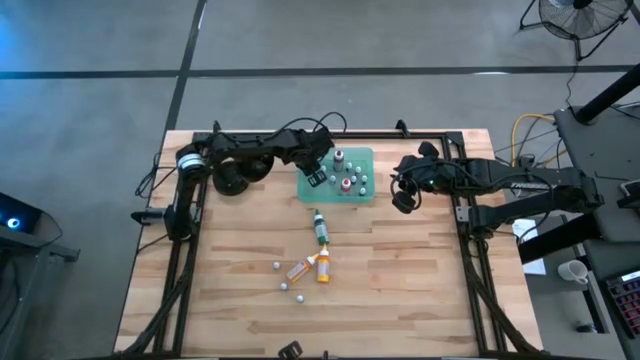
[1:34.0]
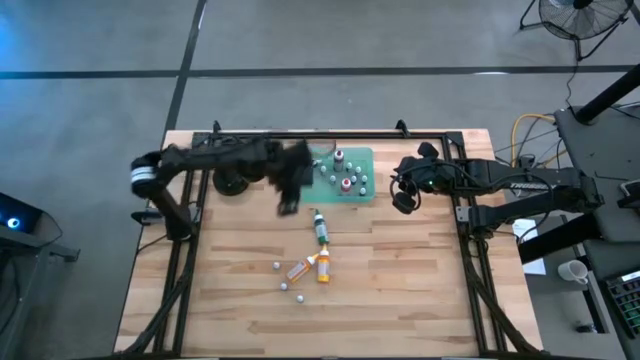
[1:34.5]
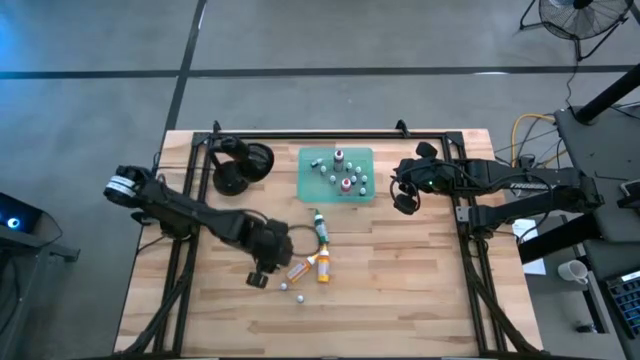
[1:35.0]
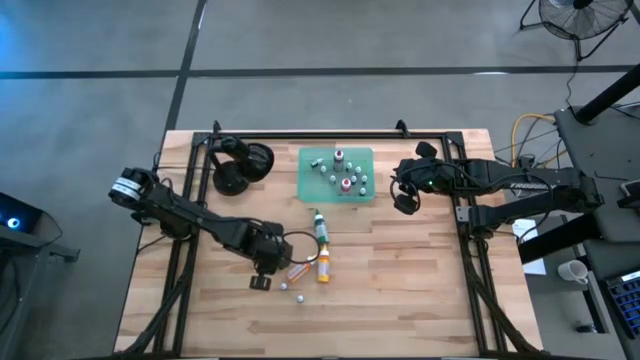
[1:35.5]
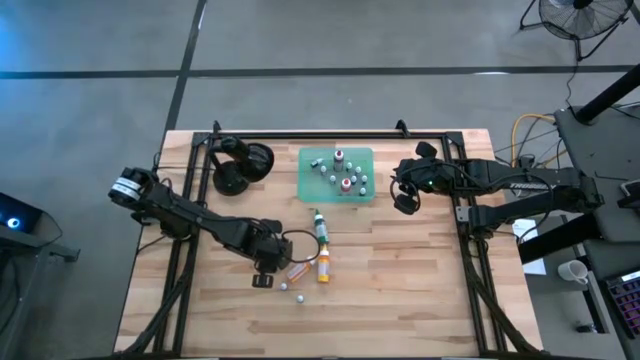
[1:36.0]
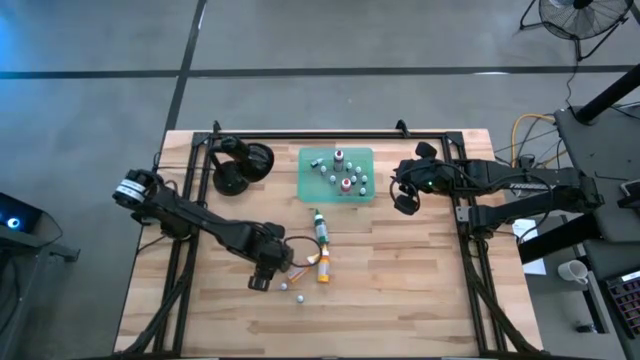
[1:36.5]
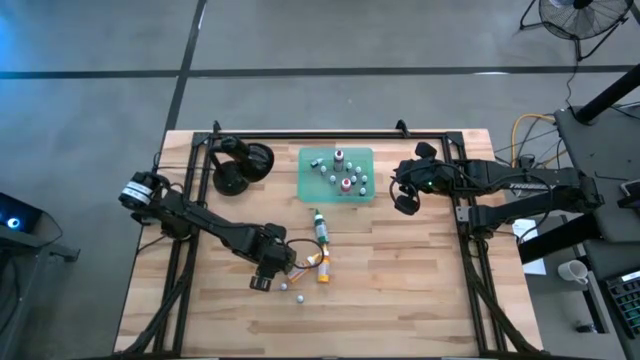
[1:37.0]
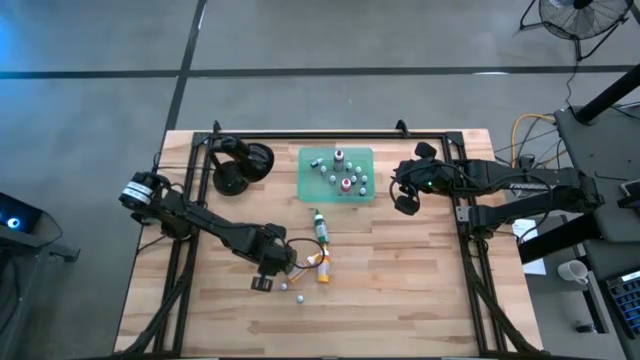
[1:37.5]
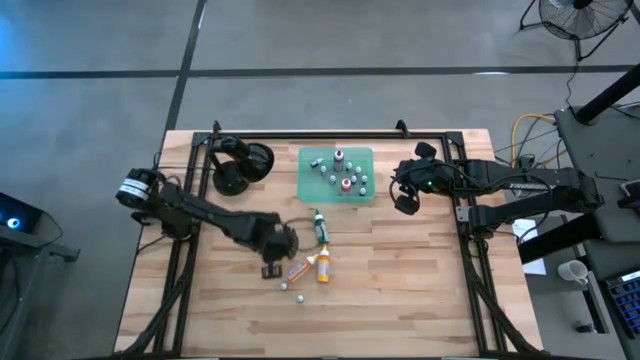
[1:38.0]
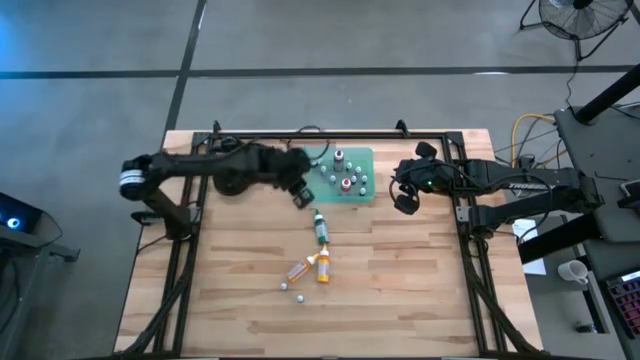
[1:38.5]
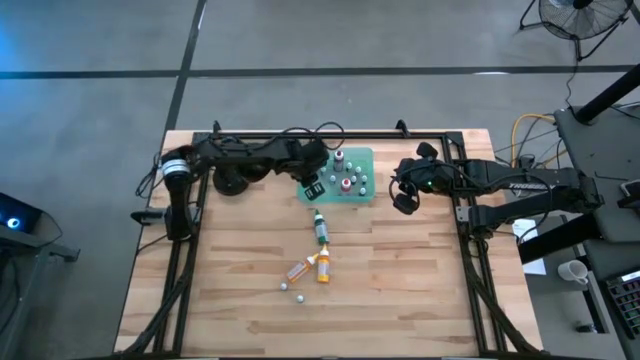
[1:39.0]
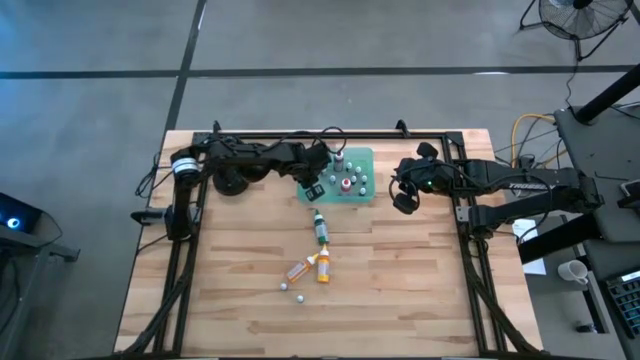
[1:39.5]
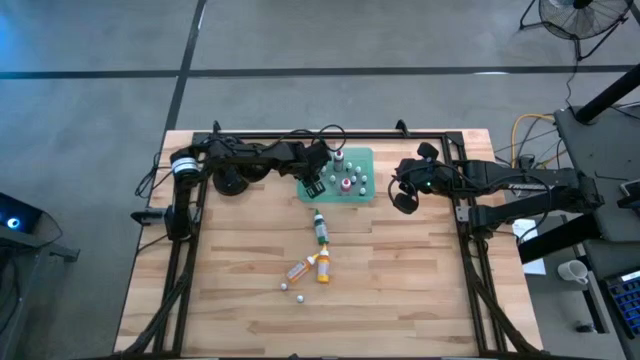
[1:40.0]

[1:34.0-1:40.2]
Task: Pick & Place food coloring
Put the middle left small green food coloring bottle into the bin

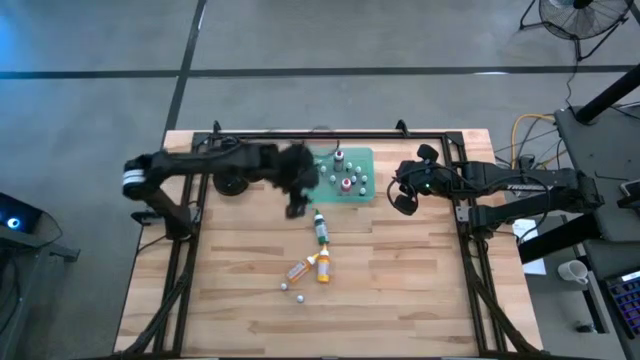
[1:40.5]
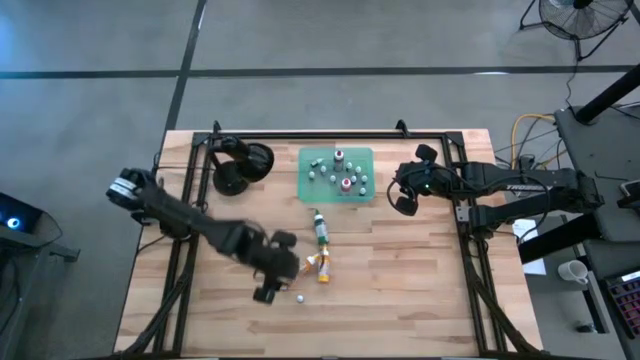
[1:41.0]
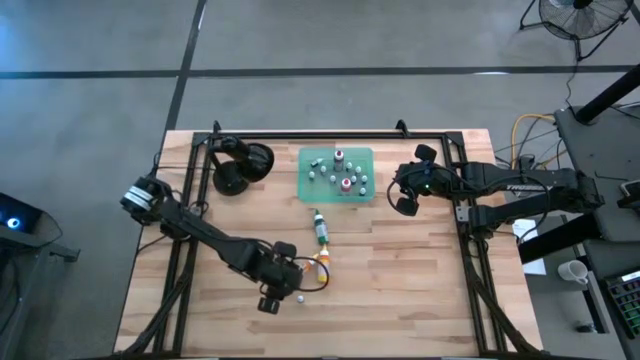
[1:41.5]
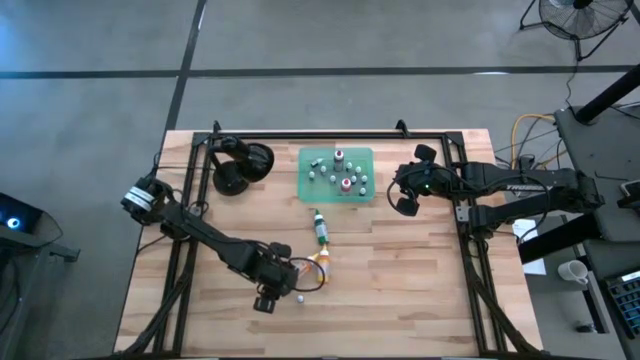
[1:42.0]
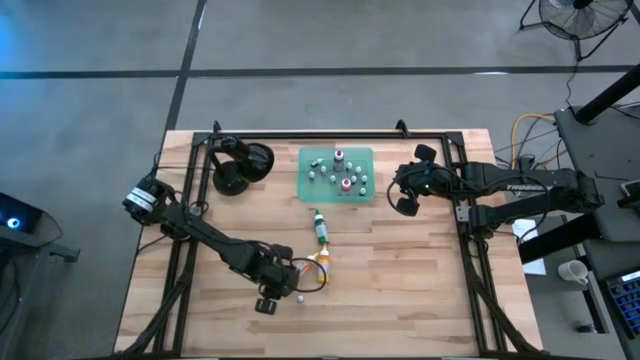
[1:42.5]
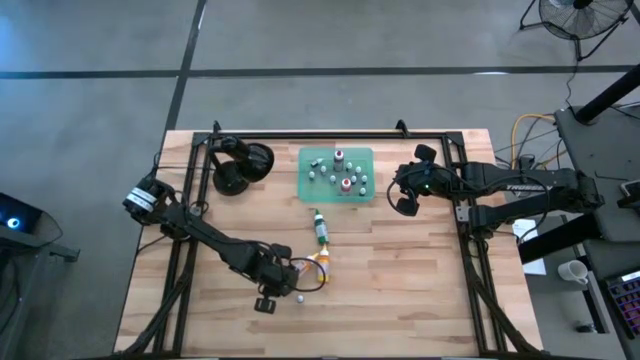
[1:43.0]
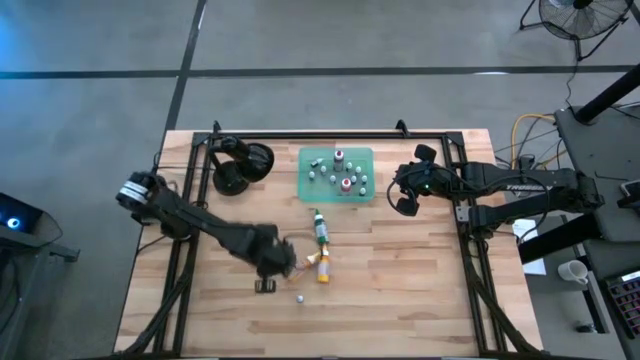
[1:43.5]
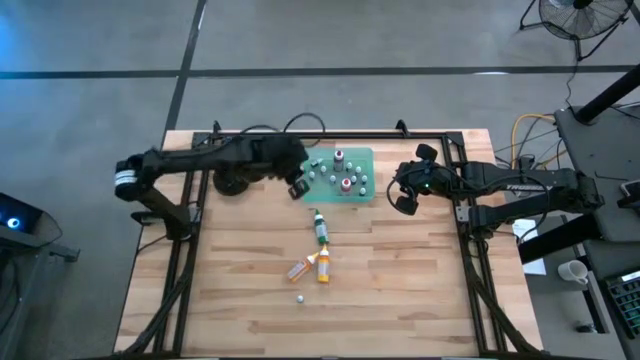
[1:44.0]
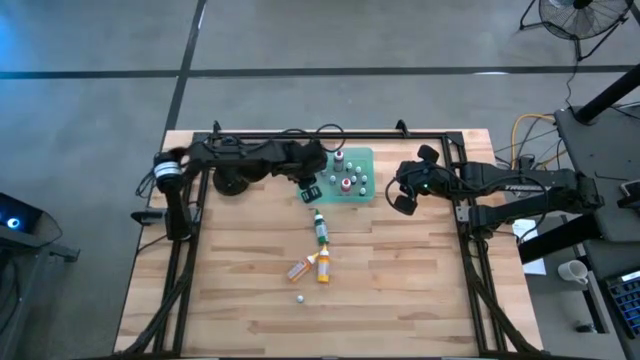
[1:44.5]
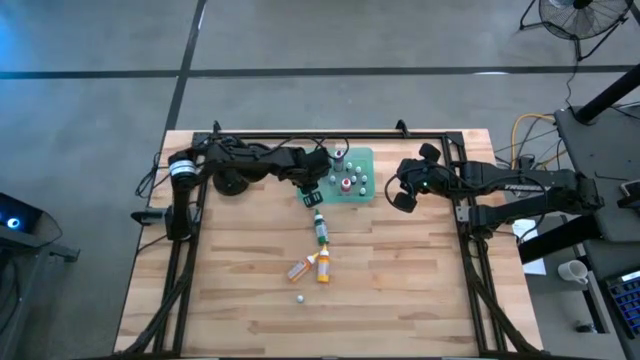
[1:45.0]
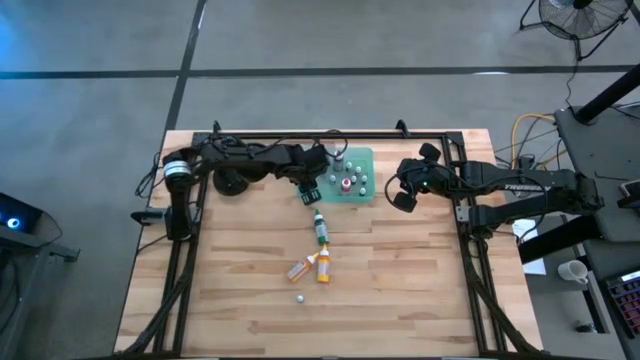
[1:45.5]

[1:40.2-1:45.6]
Put the small red food coloring bottle into the bin

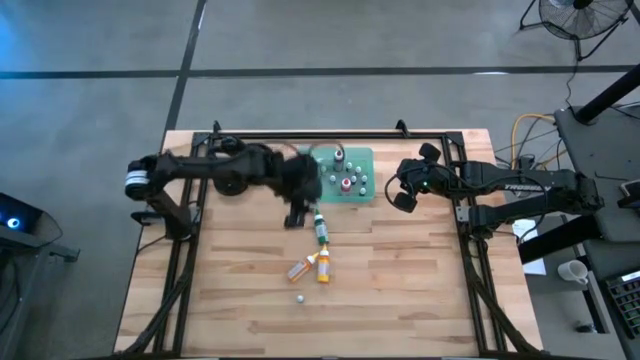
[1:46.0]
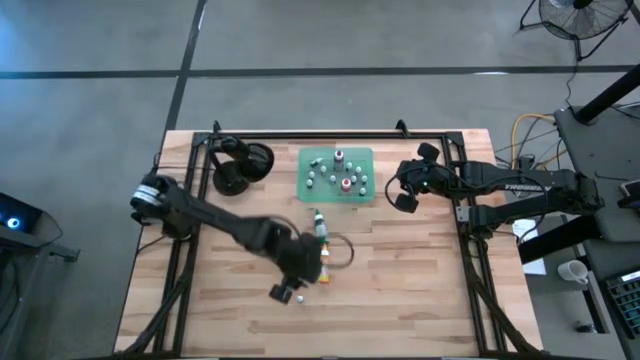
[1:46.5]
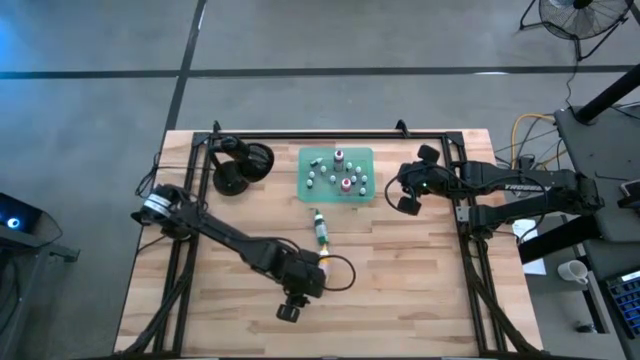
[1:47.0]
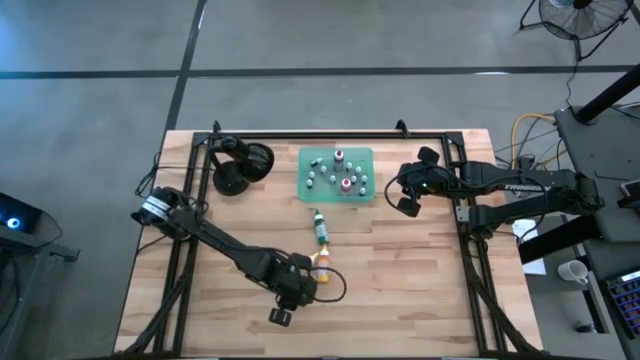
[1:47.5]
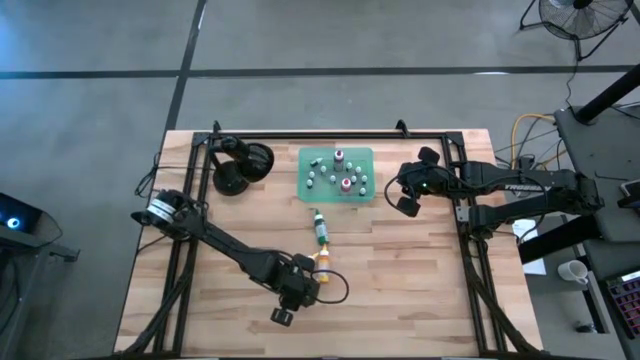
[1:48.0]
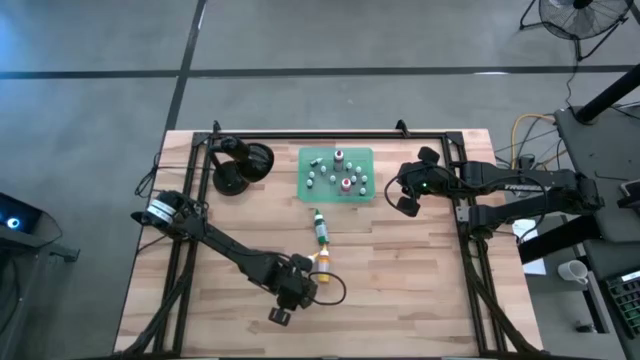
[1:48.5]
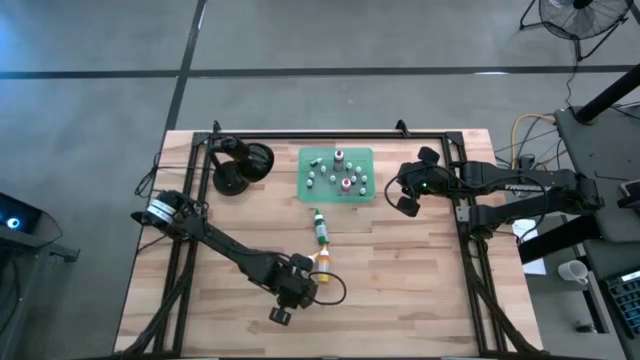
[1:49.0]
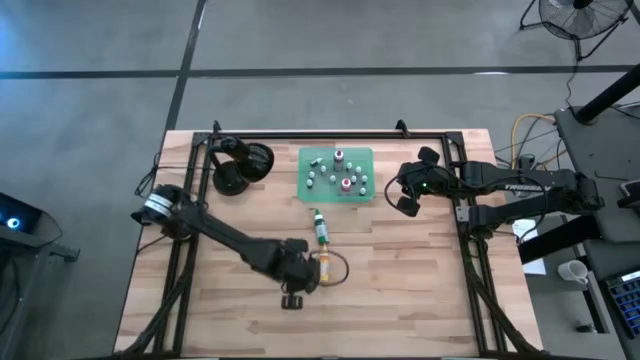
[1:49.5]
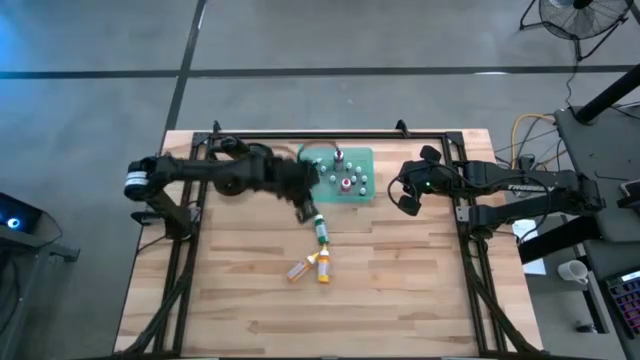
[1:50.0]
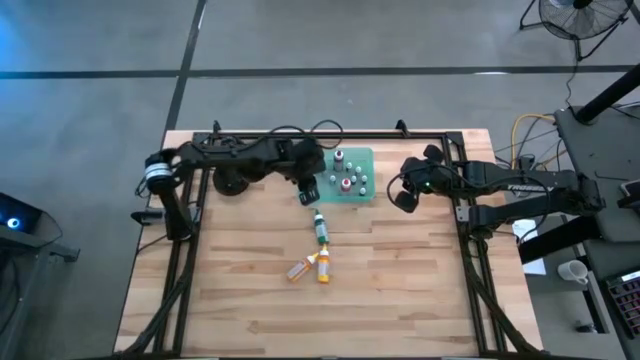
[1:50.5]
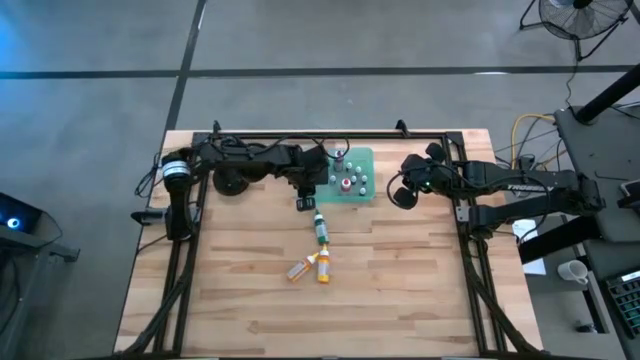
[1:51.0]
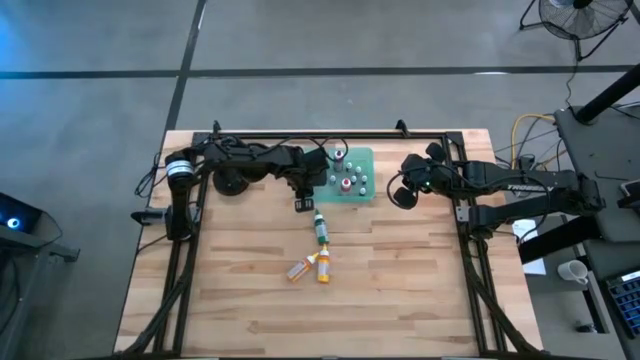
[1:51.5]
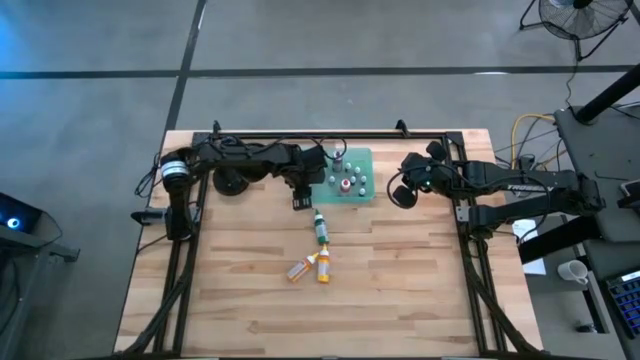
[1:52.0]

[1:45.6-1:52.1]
Put the small green food coloring bottle into the bin

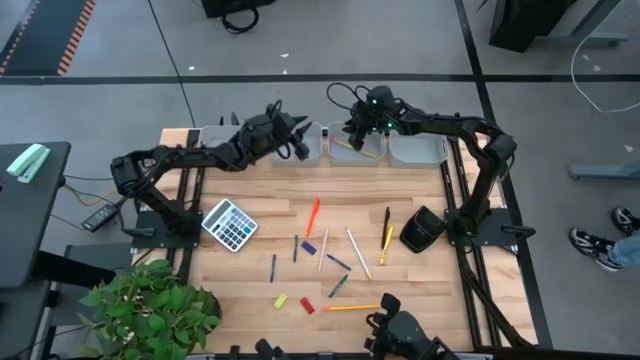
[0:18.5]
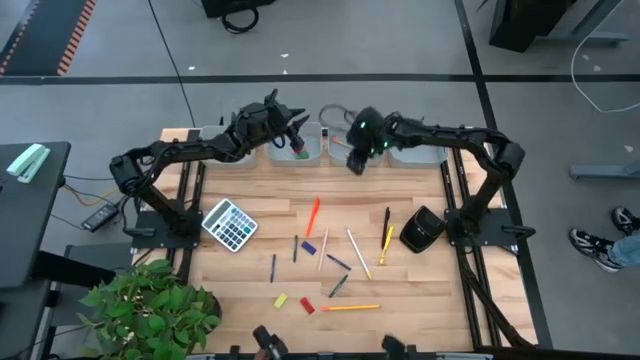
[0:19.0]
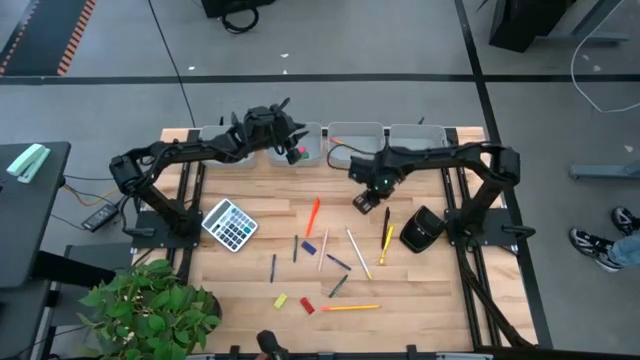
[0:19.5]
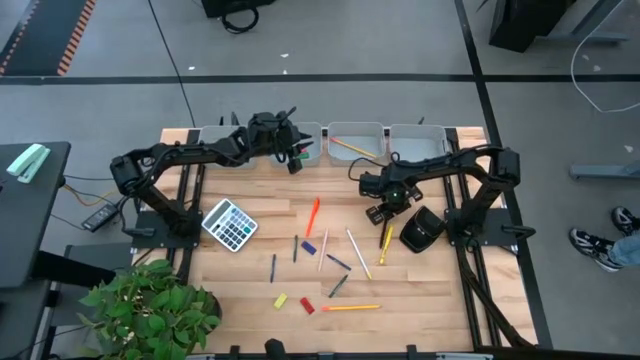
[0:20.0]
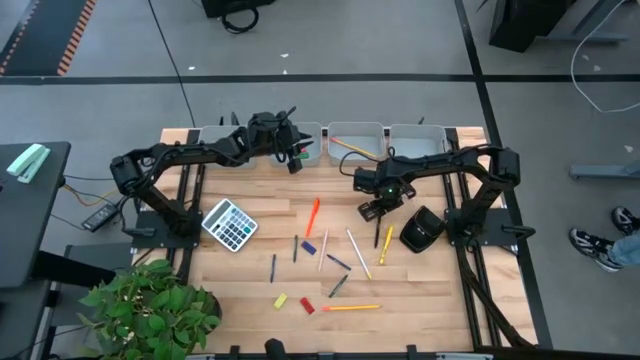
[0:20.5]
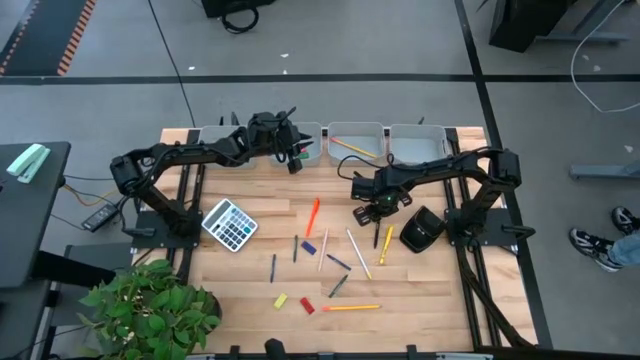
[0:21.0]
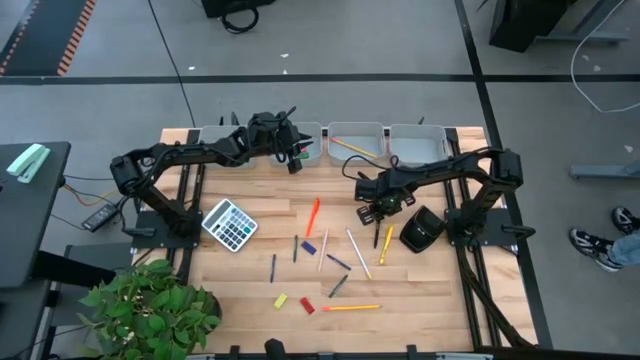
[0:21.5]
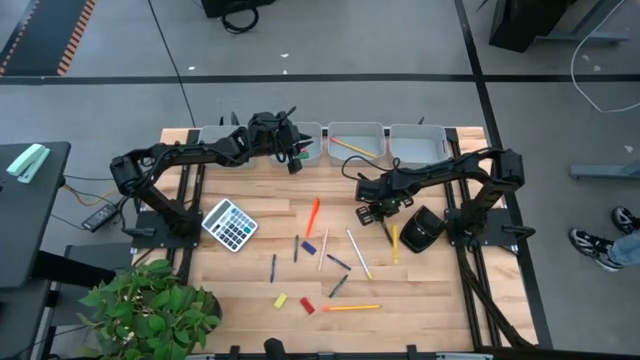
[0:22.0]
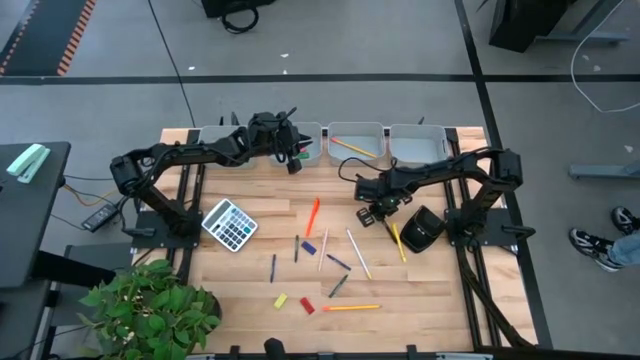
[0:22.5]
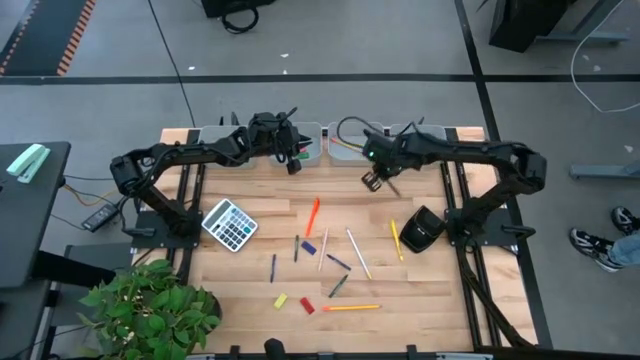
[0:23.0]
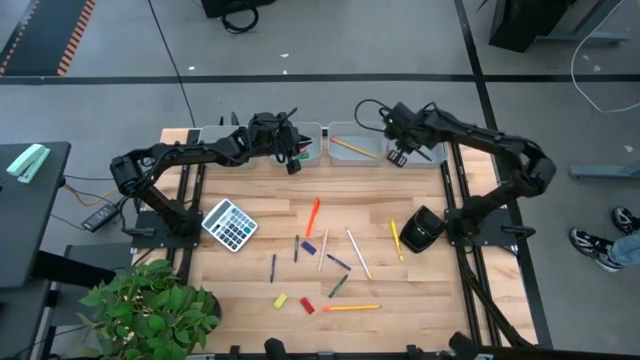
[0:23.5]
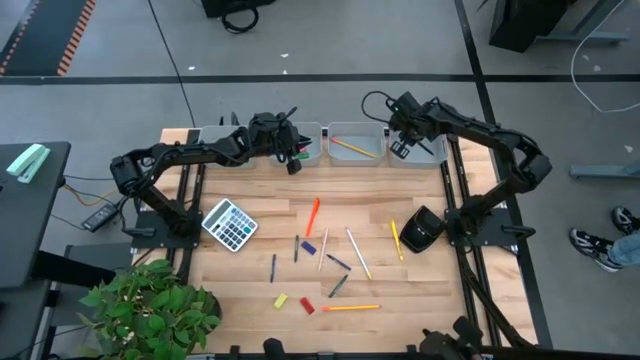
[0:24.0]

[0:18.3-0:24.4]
Task: Sort crayons/erasers/pens/pencils in bins
Put the black pen into the gray bin
